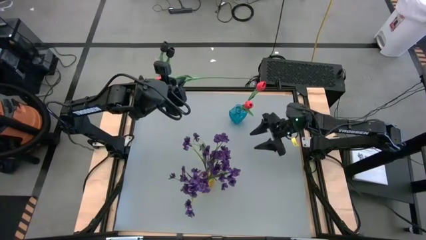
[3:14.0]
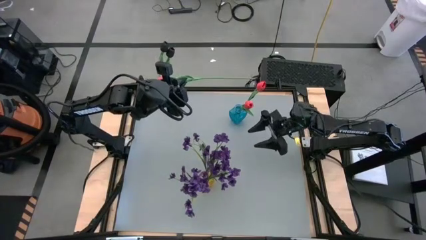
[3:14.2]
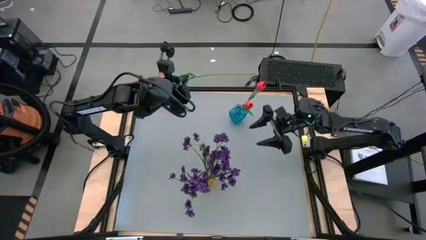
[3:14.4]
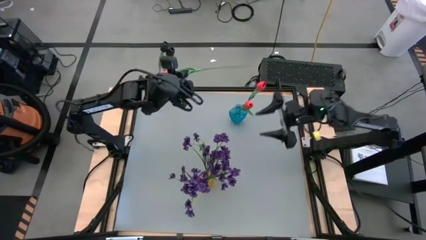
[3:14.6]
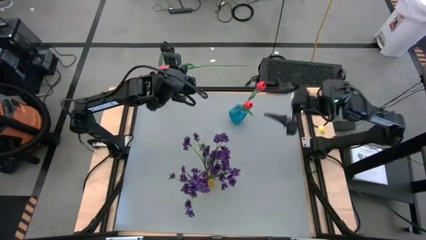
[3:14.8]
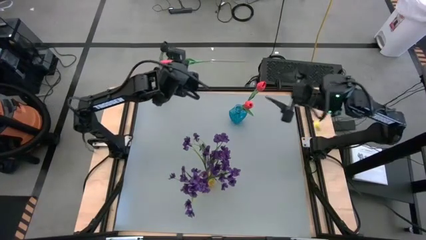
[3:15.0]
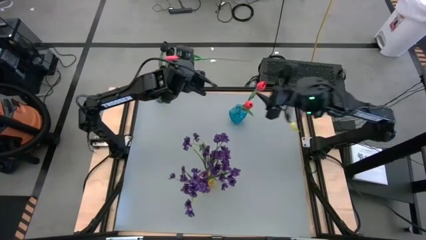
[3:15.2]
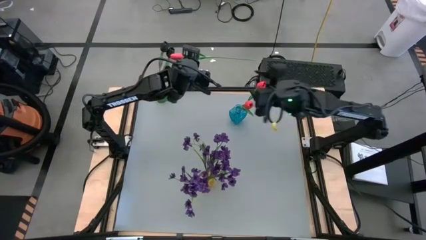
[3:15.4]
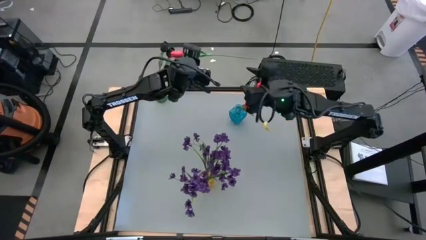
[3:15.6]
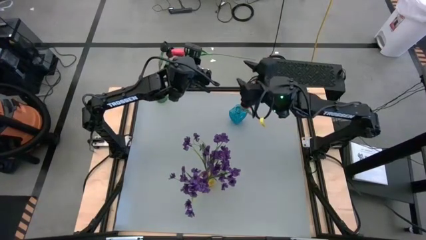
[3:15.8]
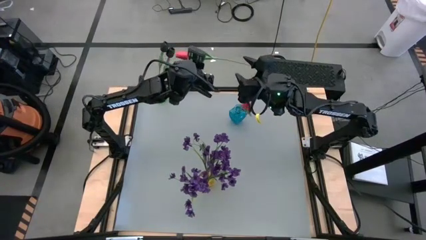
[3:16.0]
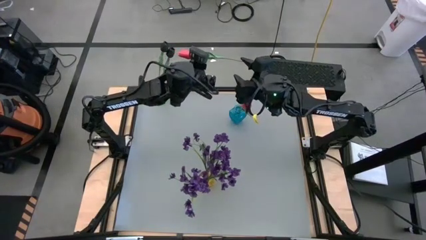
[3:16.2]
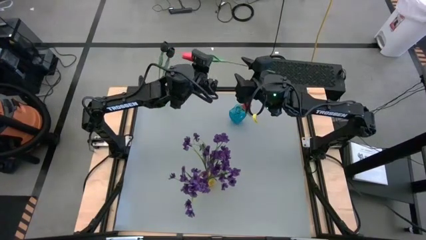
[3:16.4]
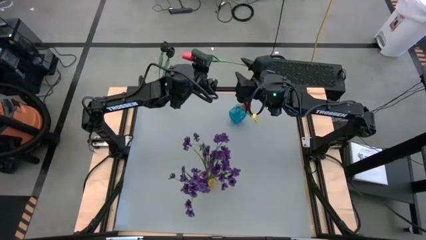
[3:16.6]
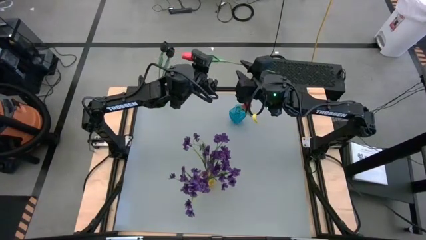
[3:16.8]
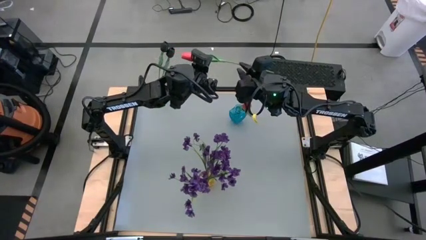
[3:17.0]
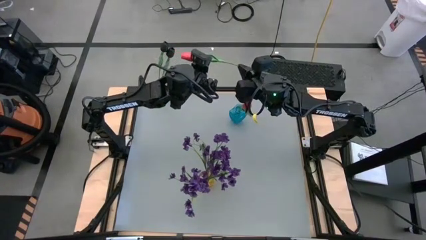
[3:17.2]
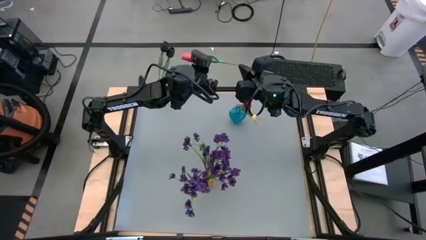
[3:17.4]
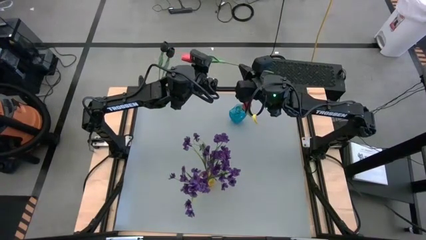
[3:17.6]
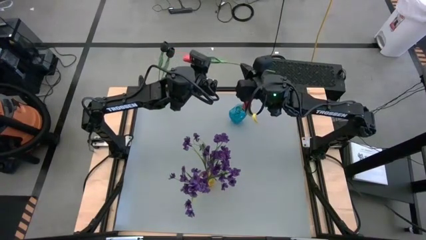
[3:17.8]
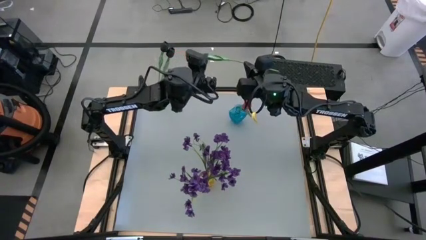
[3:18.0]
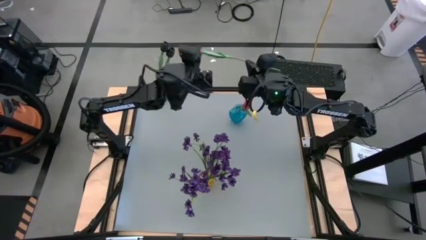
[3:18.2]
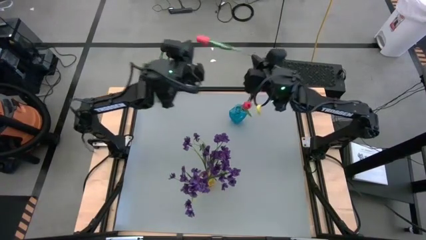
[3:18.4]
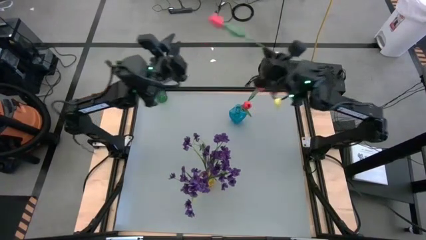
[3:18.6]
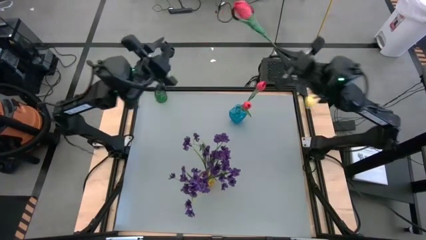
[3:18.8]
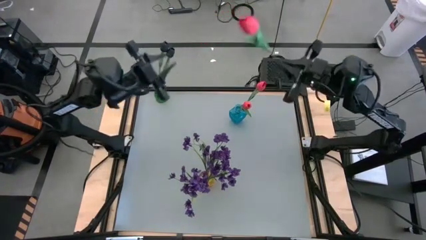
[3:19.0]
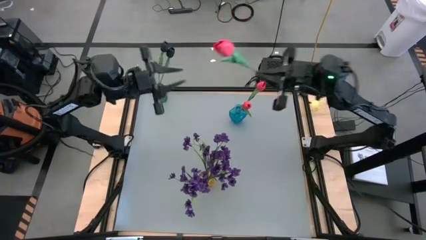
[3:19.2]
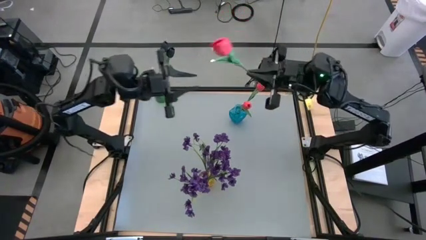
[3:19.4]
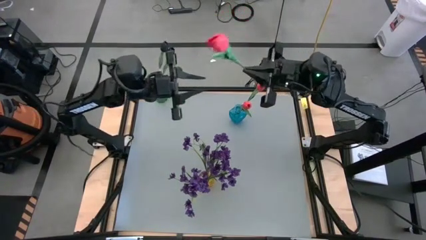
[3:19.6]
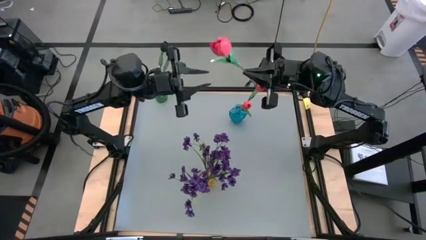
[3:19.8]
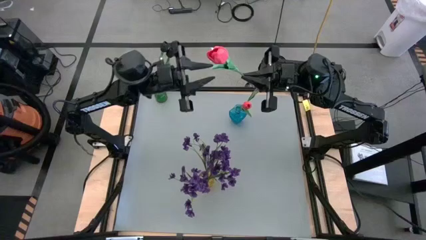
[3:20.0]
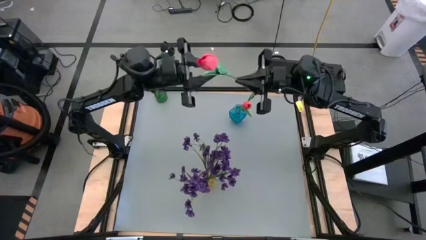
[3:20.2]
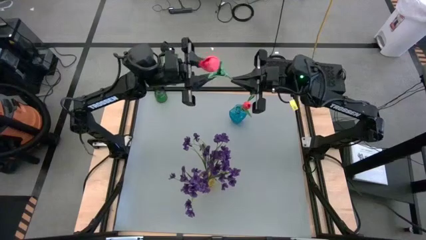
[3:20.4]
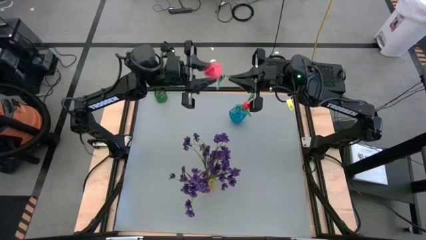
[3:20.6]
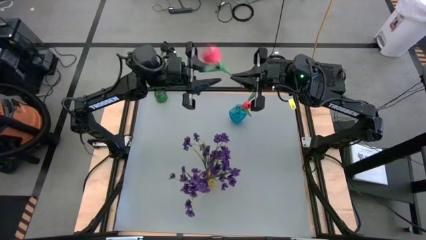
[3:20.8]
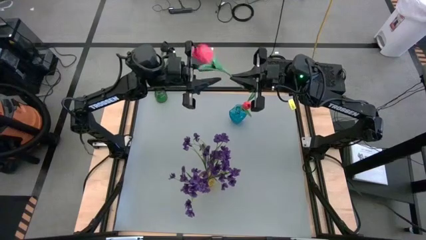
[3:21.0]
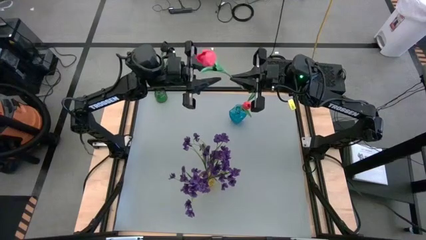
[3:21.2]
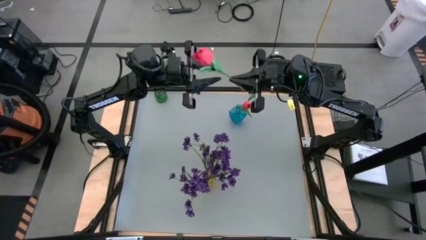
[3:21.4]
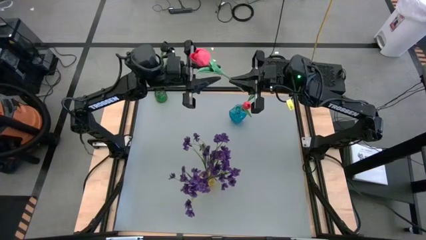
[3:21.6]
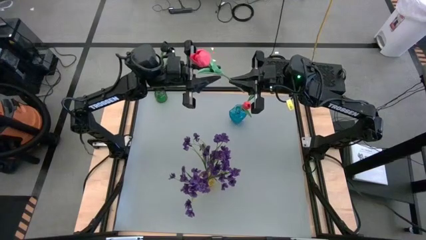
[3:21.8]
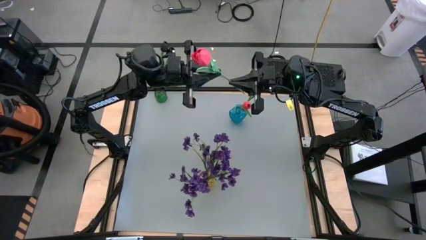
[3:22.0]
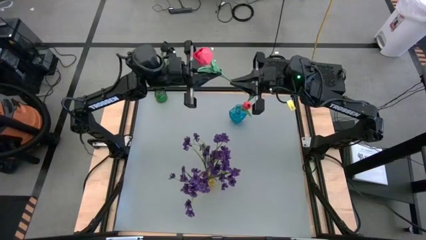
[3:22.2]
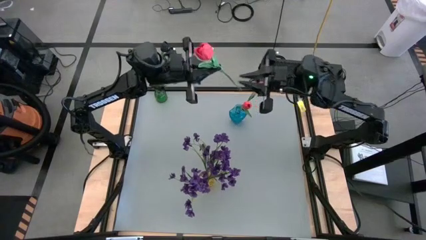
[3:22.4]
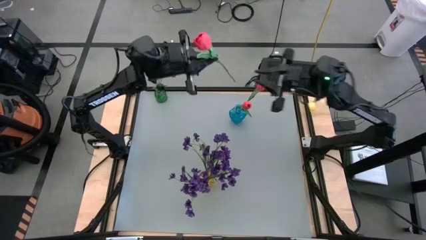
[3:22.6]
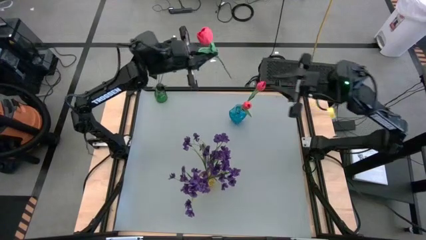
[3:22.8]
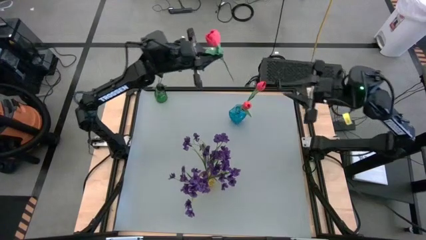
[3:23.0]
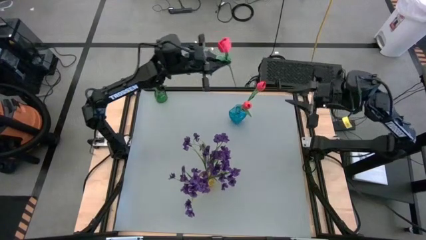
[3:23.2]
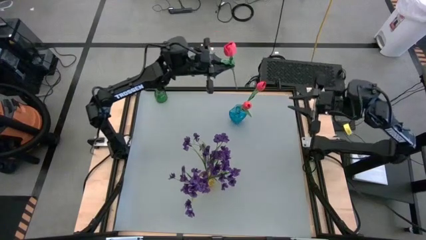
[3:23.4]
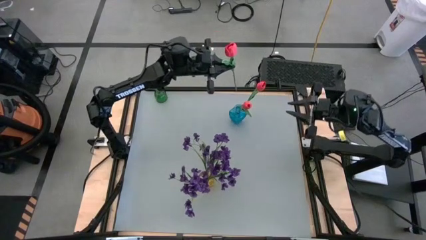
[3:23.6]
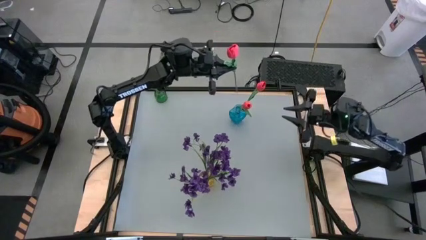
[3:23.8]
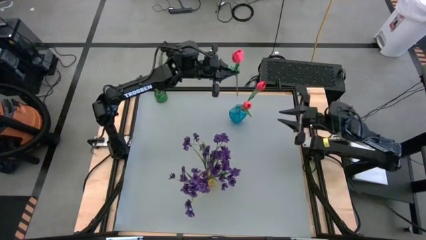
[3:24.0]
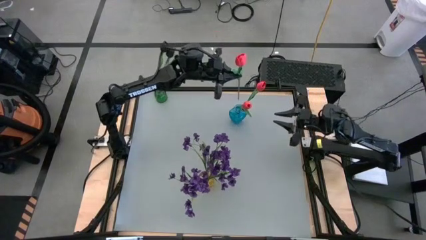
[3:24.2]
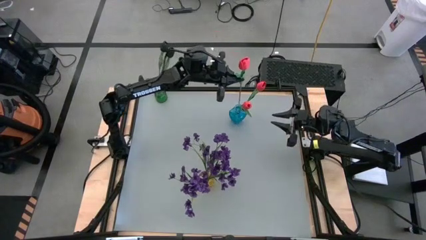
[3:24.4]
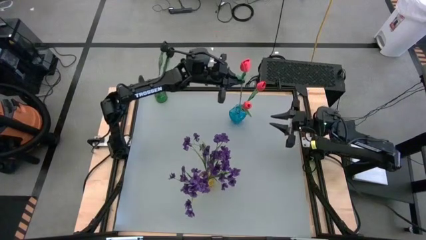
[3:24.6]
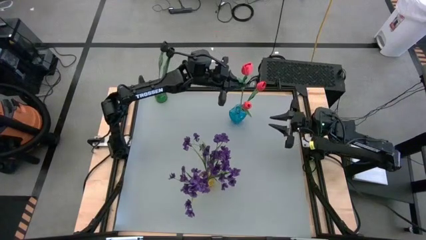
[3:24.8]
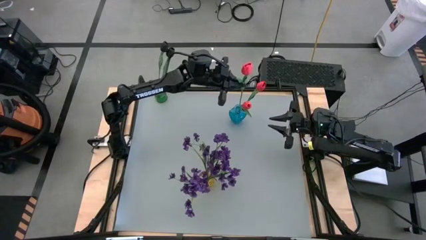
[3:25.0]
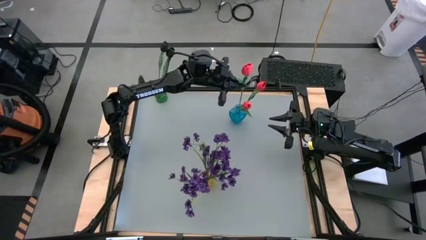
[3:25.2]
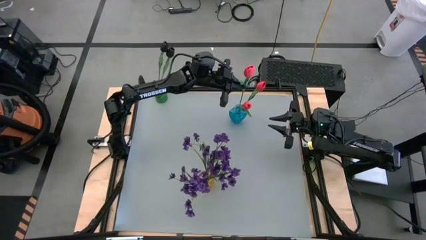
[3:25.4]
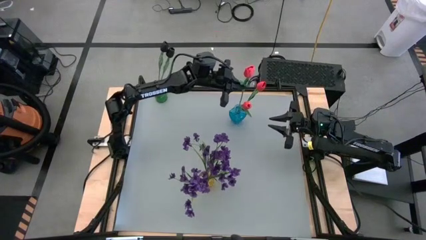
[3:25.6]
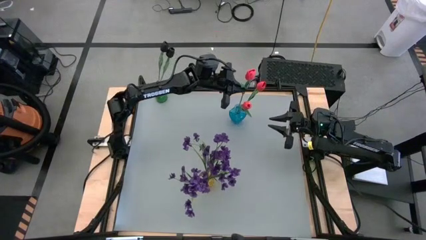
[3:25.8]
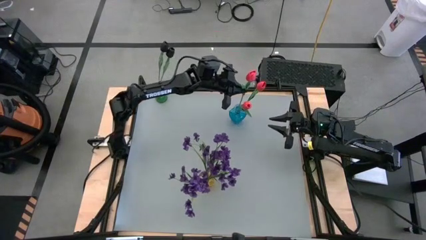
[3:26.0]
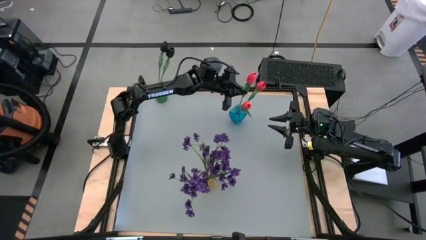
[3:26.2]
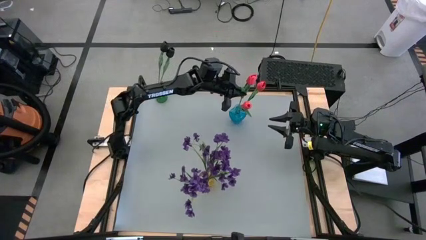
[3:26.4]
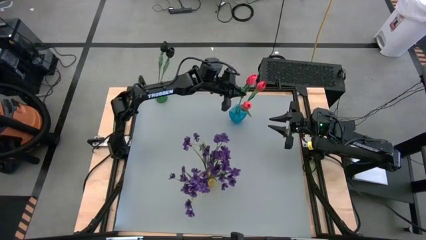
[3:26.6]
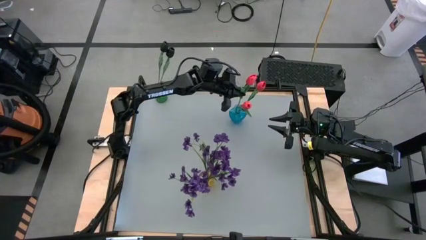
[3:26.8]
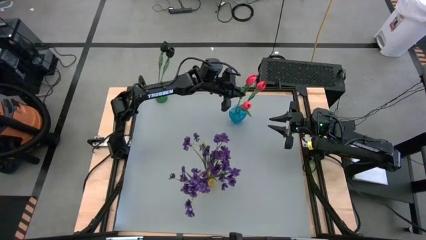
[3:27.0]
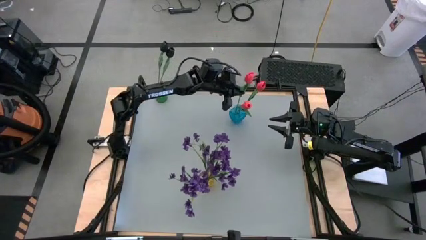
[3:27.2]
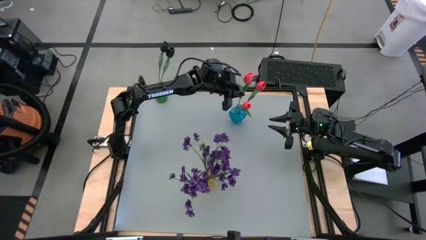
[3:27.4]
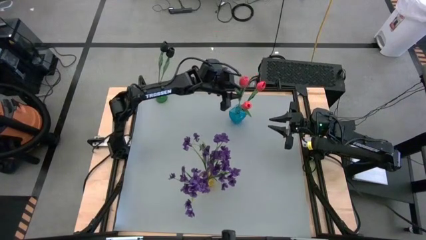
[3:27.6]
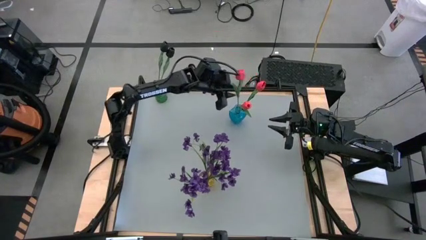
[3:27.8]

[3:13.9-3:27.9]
Task: Sort flowers into vase by color
Put the pink flower into the blue vase

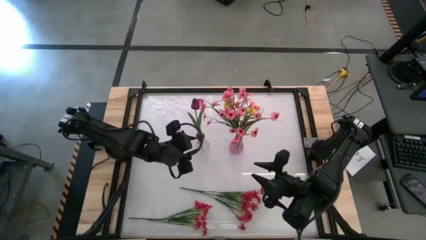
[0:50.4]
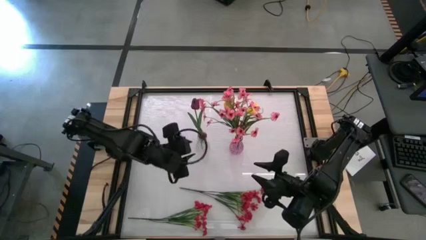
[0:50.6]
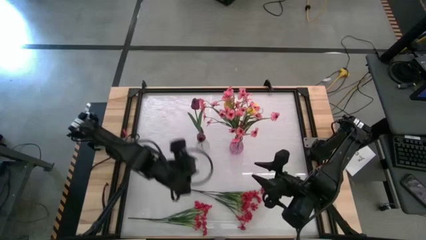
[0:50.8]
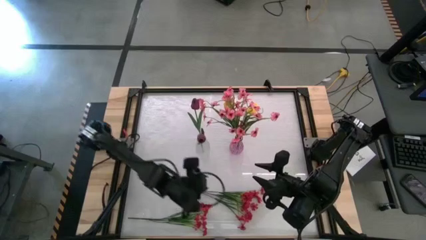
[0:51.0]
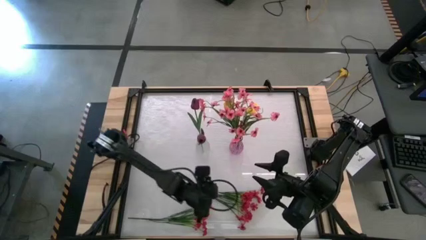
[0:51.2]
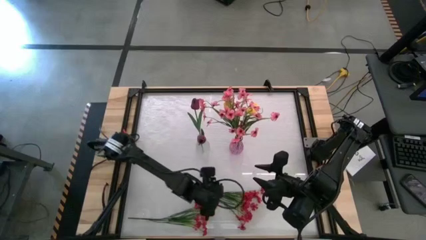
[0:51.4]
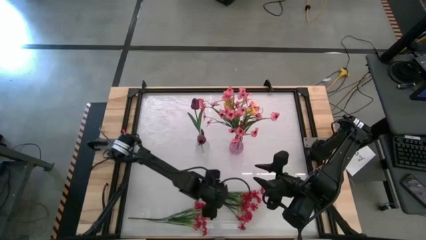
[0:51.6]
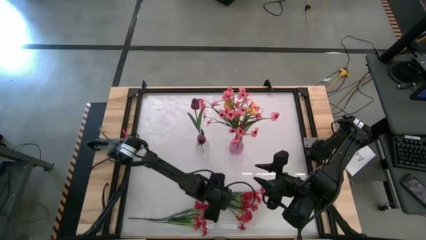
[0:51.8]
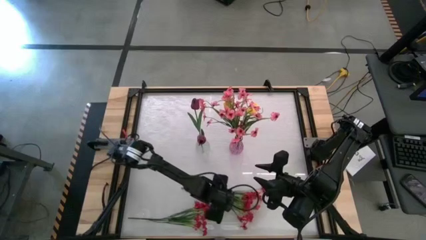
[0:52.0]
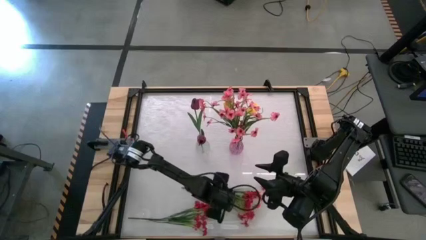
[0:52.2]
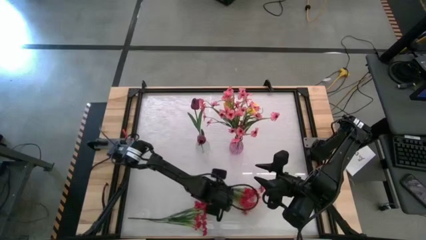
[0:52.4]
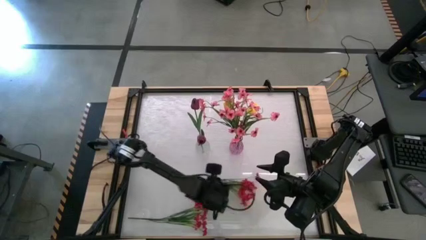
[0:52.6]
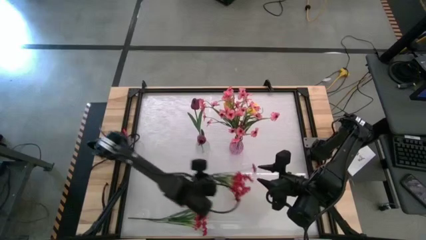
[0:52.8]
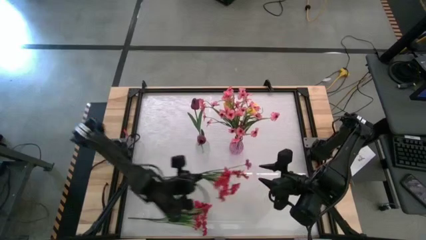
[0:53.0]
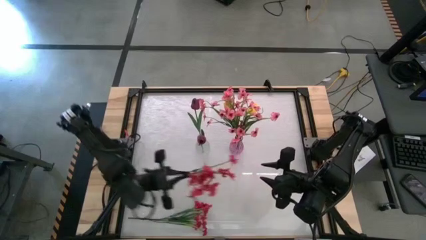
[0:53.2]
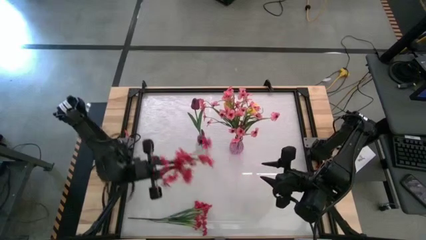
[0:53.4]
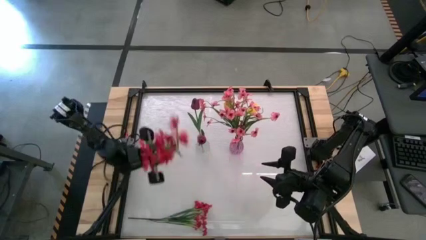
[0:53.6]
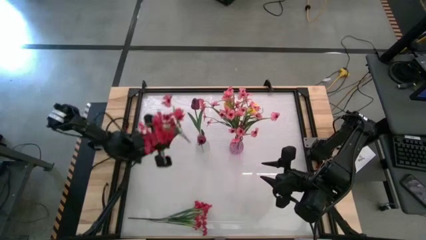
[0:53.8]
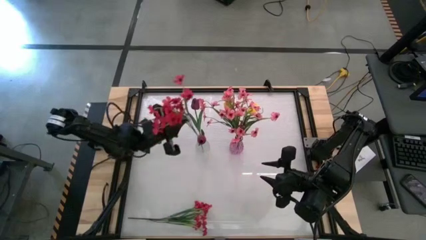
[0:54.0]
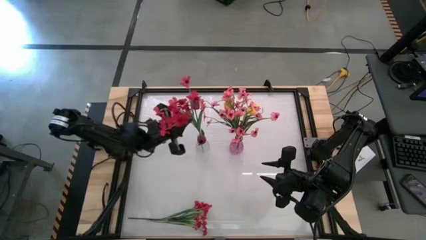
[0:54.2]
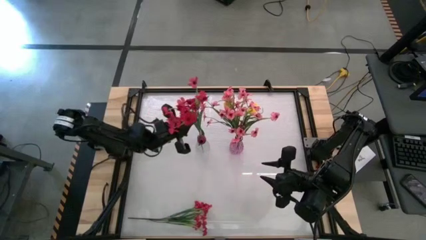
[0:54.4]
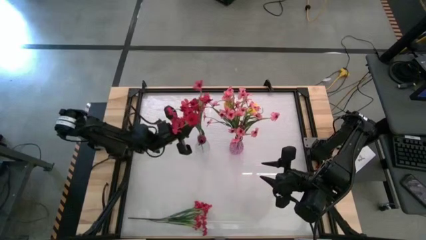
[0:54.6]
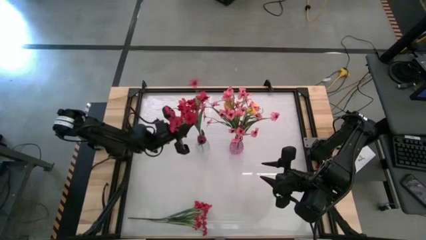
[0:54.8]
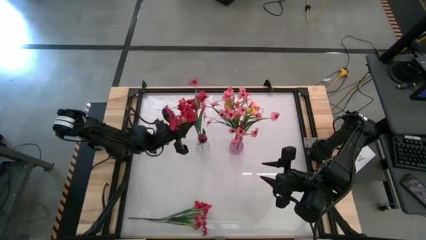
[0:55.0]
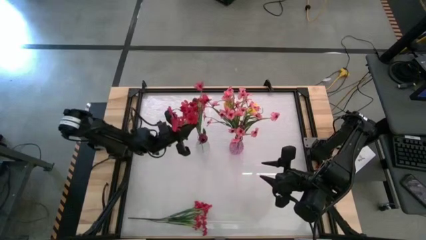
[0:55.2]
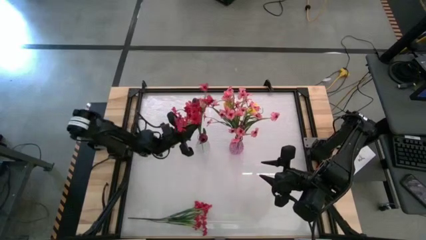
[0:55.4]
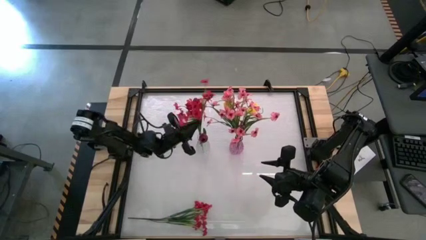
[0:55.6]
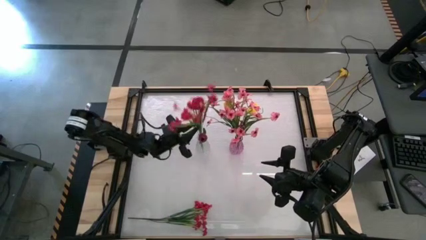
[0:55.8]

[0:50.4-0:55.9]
Task: Sort flowers into vase by color
Put the right red flower into the transparent vase
